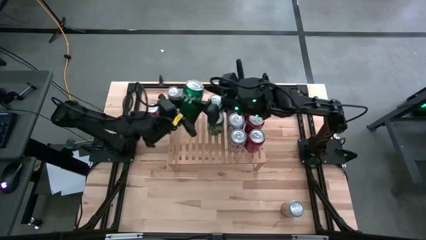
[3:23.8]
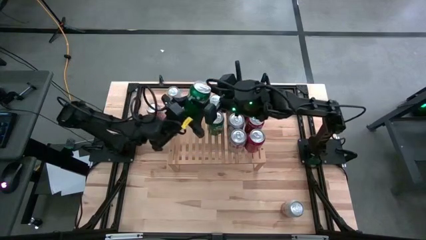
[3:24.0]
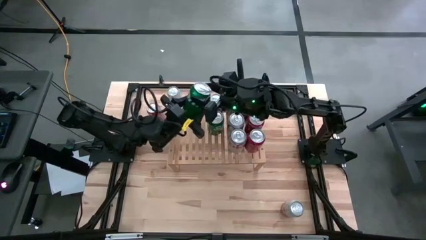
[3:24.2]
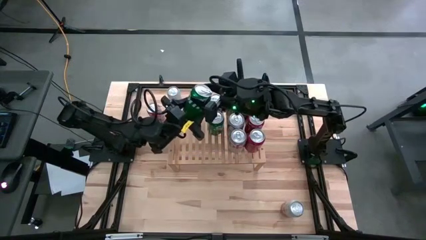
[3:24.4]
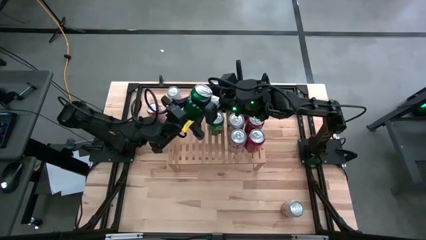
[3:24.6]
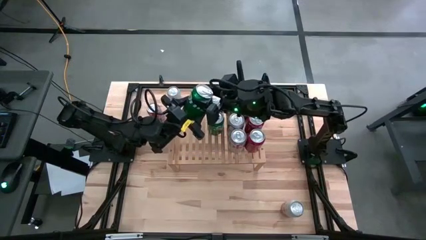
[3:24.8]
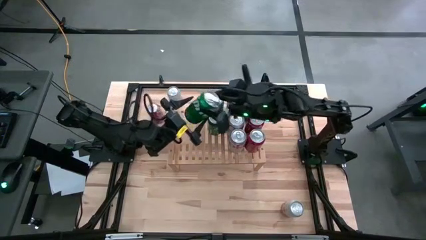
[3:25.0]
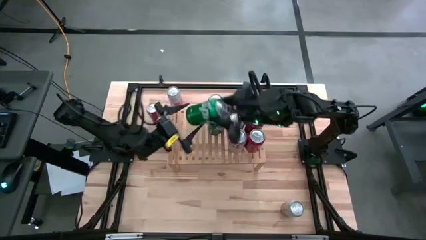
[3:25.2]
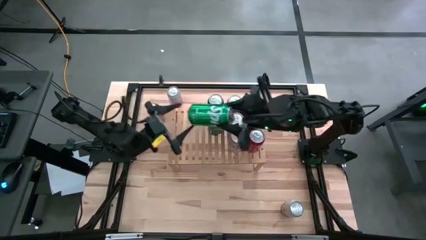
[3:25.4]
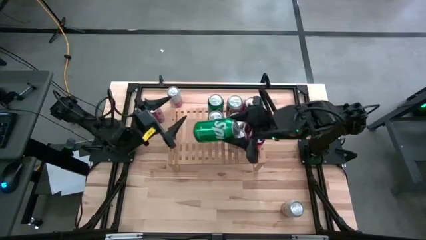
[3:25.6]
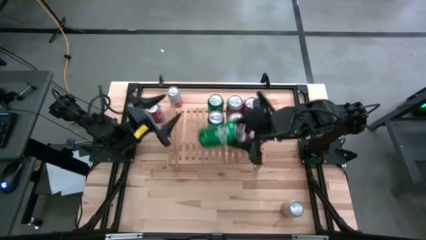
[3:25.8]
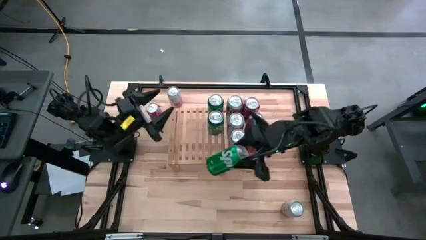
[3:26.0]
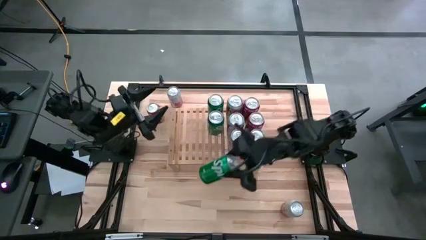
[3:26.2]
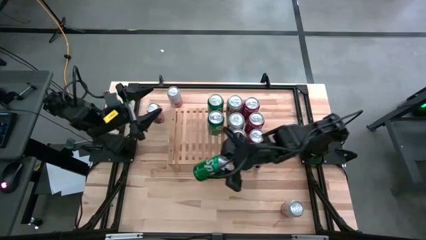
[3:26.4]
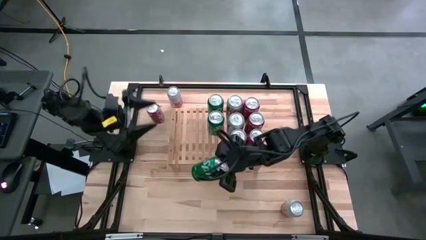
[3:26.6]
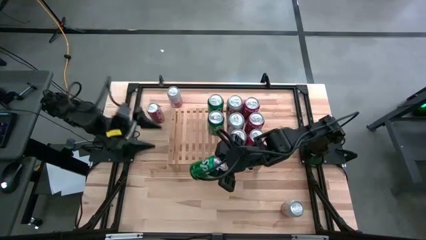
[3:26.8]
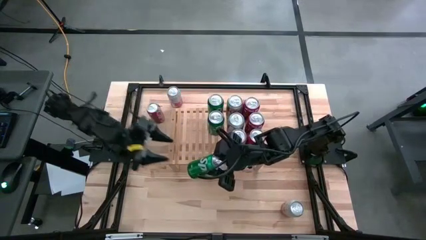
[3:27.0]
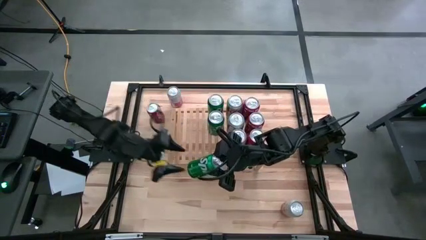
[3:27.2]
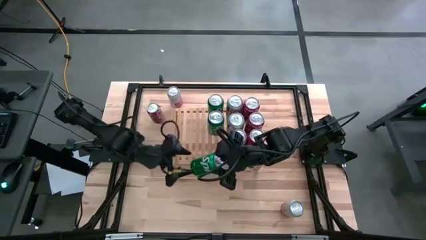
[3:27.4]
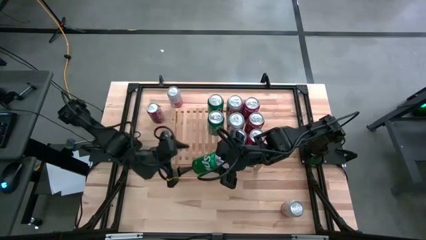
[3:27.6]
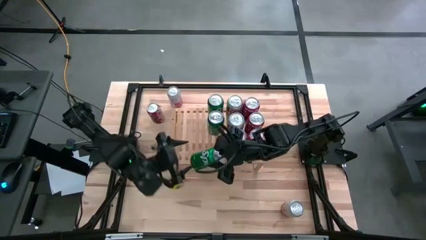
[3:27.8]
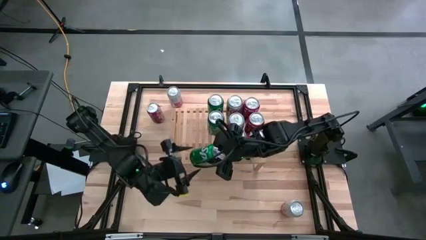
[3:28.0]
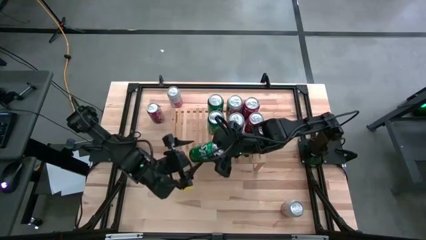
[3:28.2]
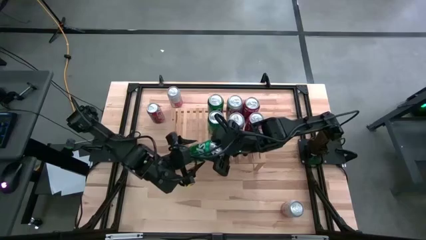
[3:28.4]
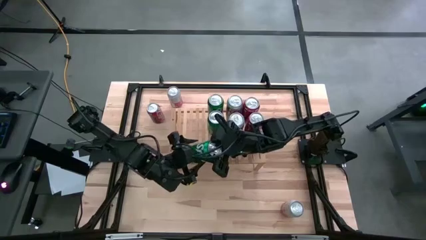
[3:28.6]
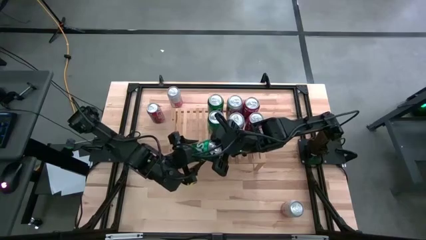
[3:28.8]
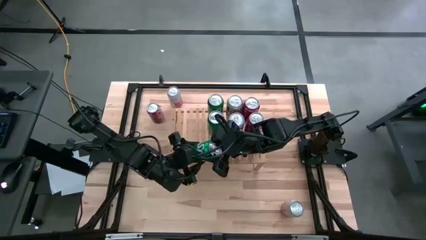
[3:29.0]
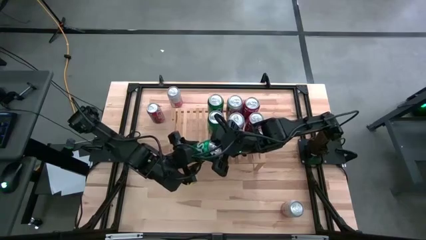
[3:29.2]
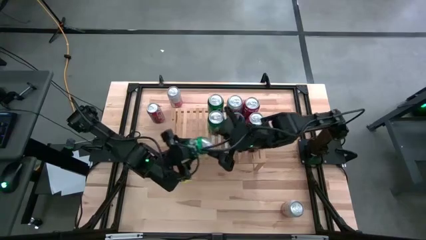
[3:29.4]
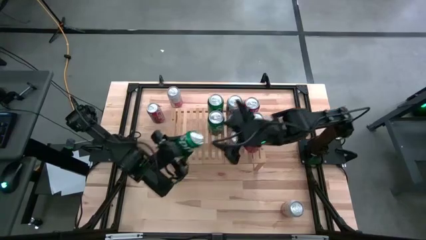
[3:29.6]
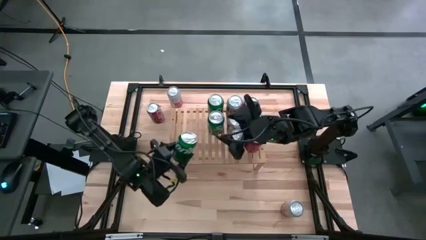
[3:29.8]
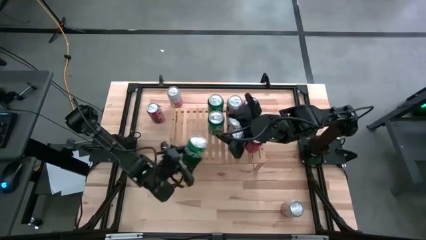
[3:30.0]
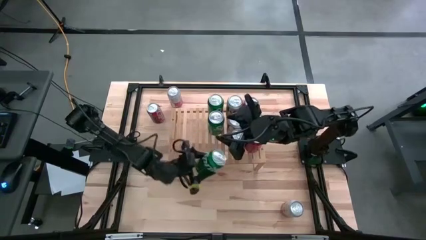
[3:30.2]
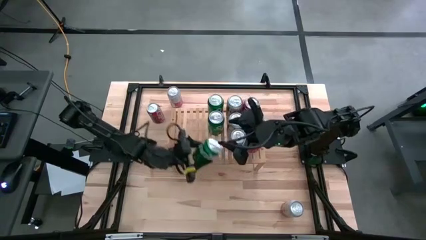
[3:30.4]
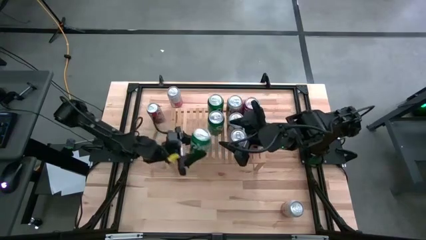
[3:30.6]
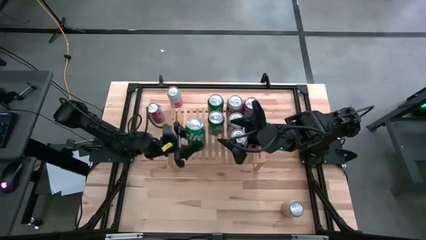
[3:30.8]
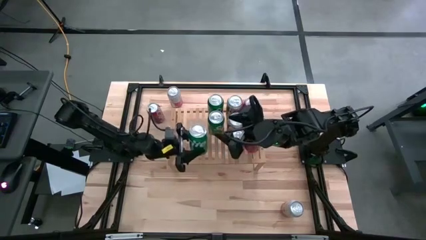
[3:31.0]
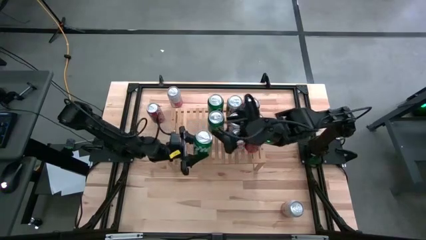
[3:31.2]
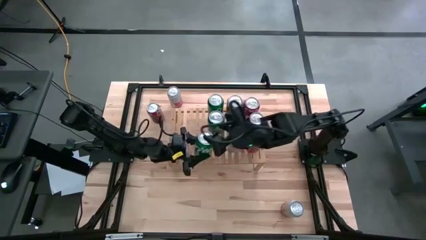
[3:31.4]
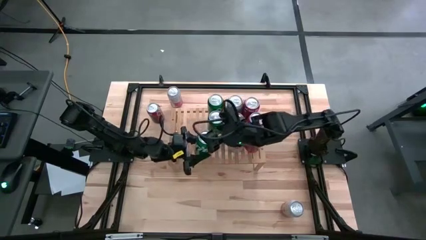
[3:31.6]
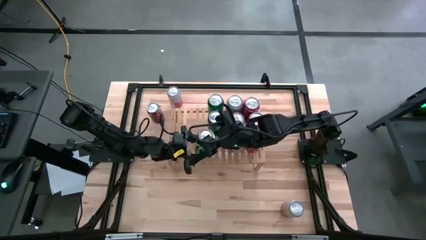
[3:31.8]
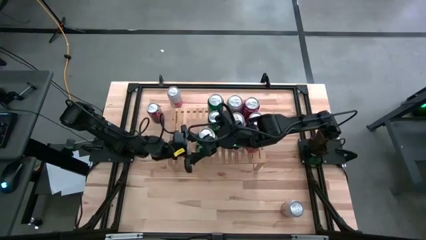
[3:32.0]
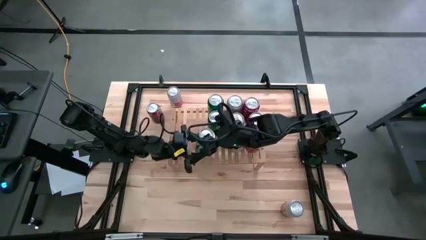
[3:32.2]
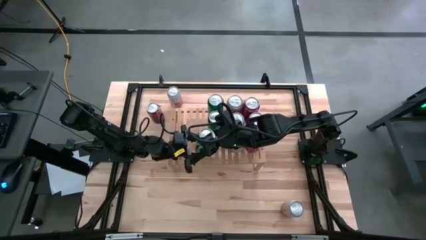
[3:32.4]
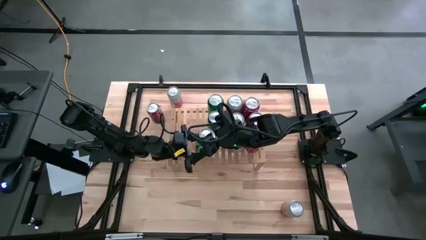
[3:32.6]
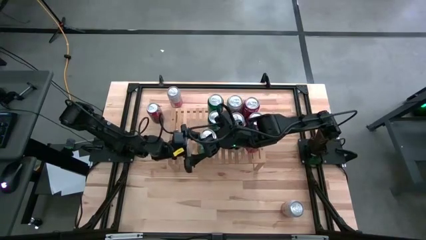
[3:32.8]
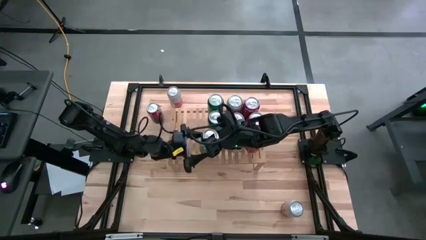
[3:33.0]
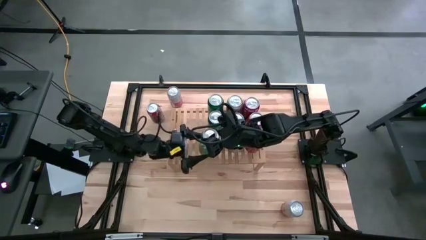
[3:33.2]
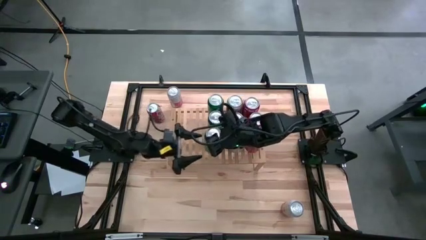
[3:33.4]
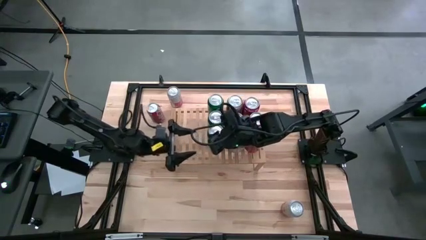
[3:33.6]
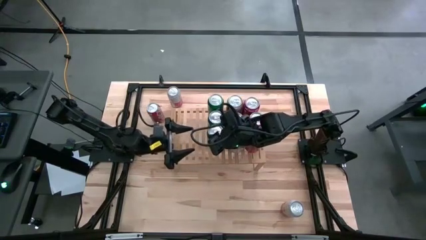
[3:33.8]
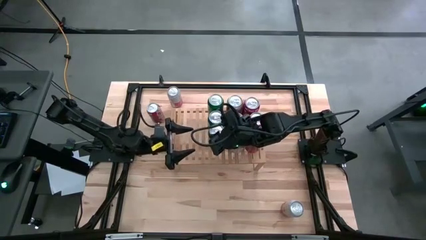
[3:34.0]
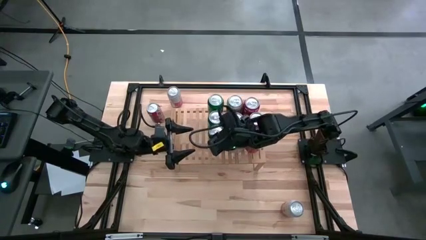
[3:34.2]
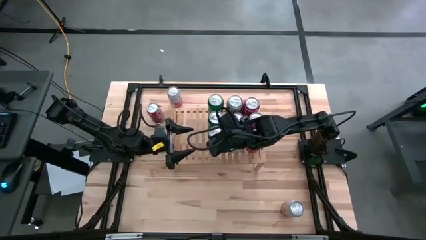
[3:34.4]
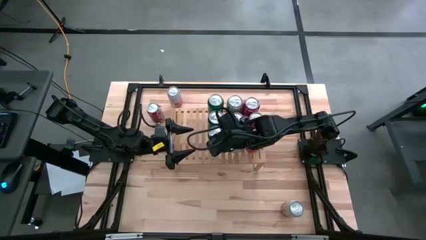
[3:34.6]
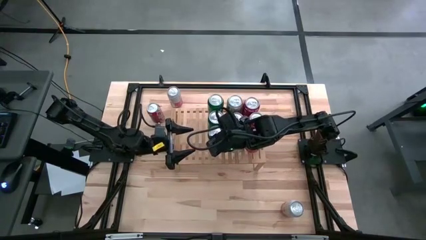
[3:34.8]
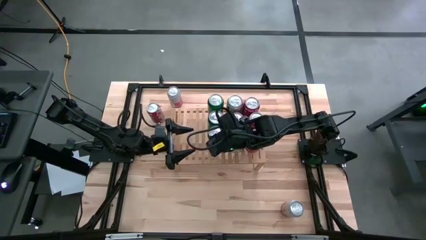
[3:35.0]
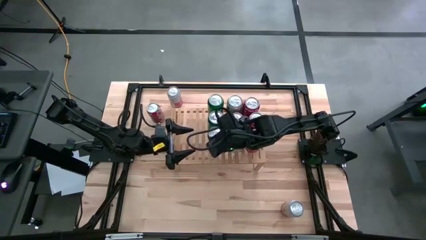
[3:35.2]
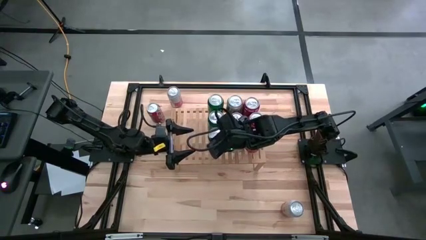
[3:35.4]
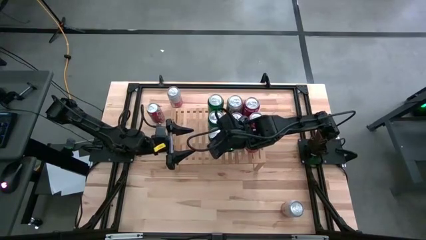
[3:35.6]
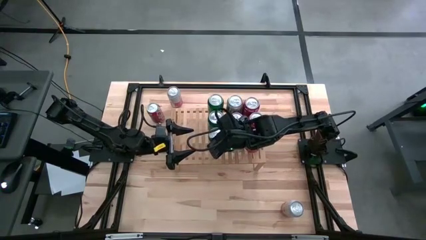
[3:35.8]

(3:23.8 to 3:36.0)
Task: Place canned beverage on shelf
Put the green soda can on the shelf

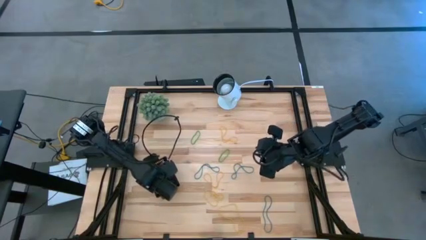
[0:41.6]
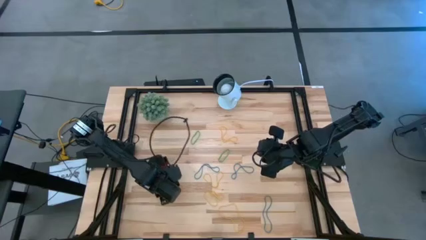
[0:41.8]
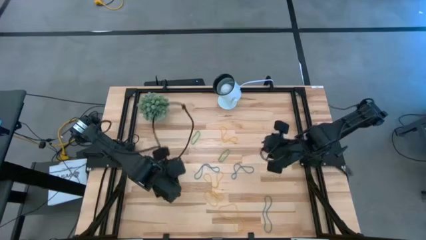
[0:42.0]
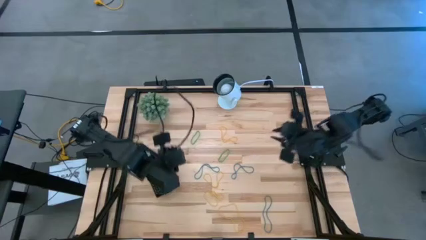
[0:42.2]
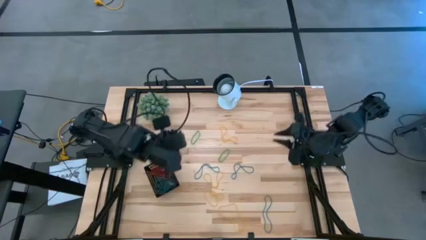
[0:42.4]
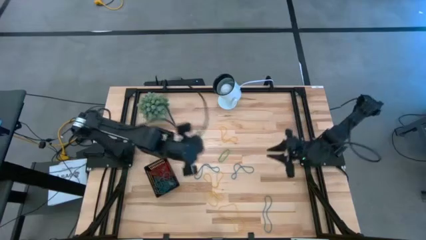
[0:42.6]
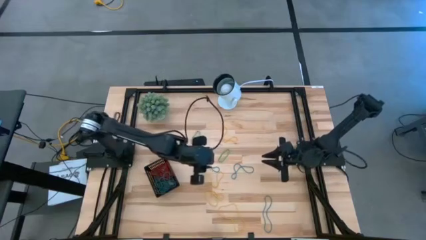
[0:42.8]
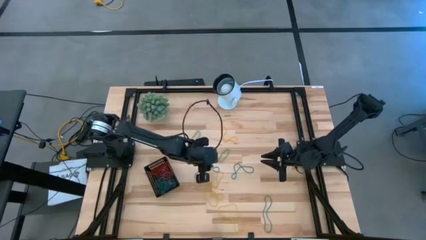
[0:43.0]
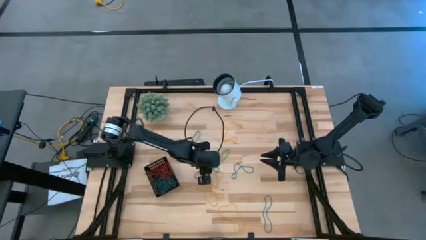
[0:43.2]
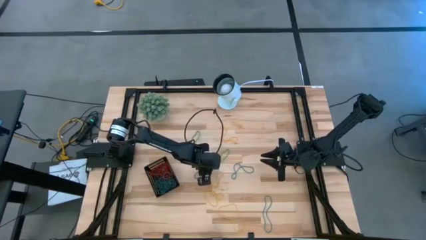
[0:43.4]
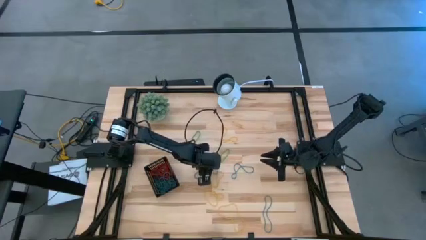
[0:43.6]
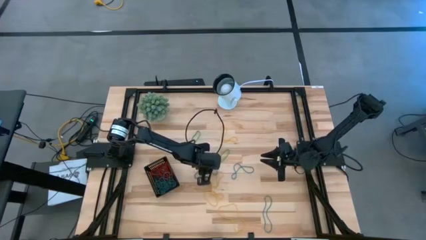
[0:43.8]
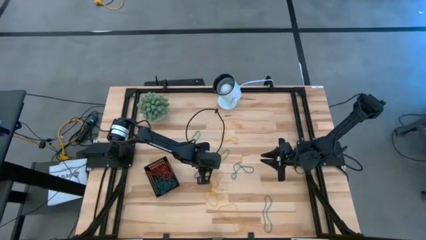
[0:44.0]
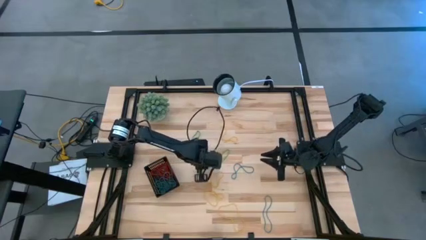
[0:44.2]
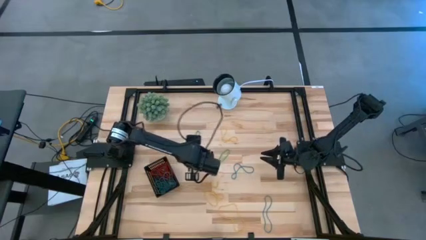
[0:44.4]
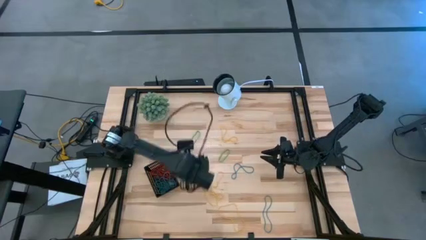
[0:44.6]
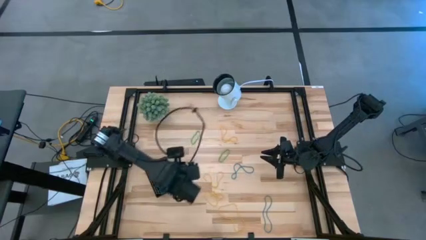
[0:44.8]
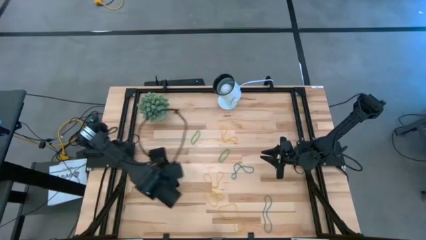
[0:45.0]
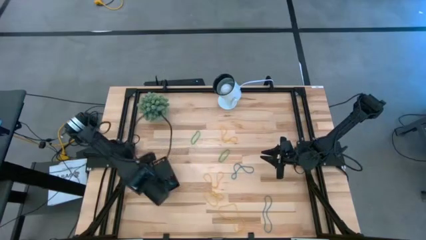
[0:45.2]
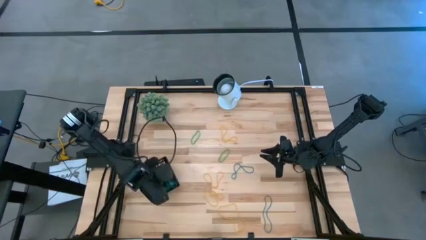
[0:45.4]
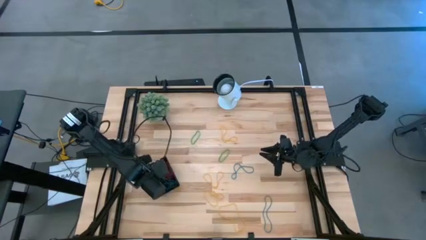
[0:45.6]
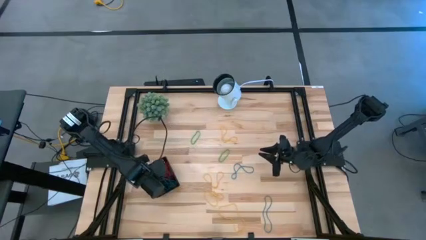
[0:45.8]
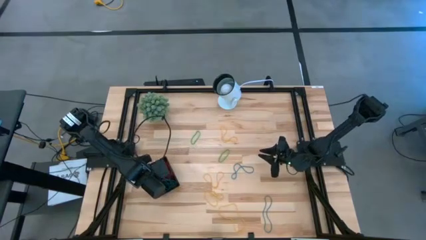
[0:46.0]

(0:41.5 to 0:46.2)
Task: Pick and place items into bin
Put the blue rubber band into the black bin
